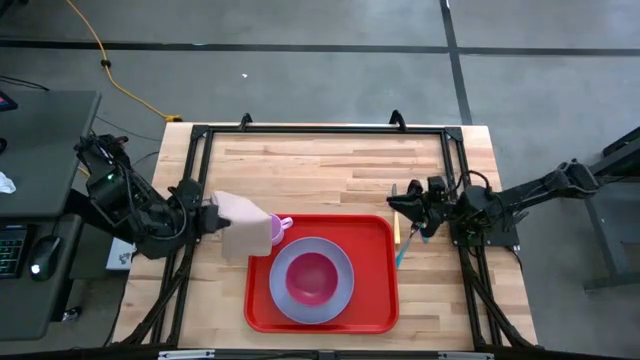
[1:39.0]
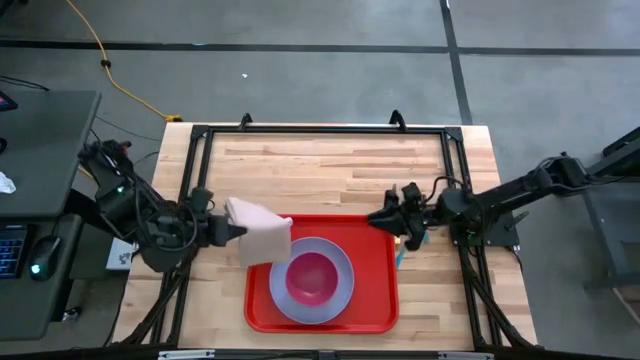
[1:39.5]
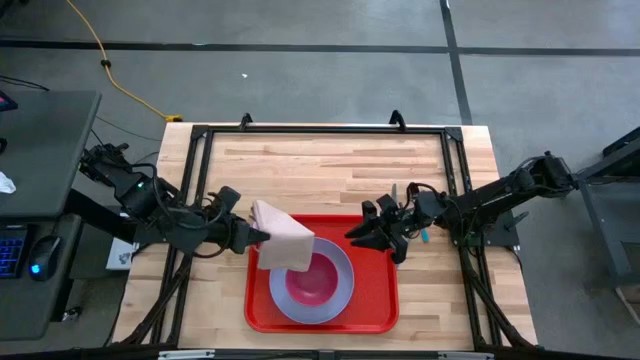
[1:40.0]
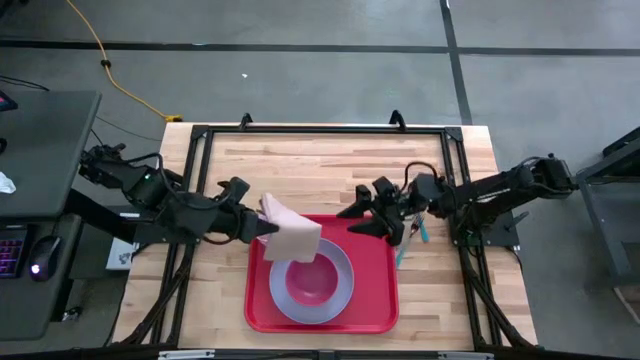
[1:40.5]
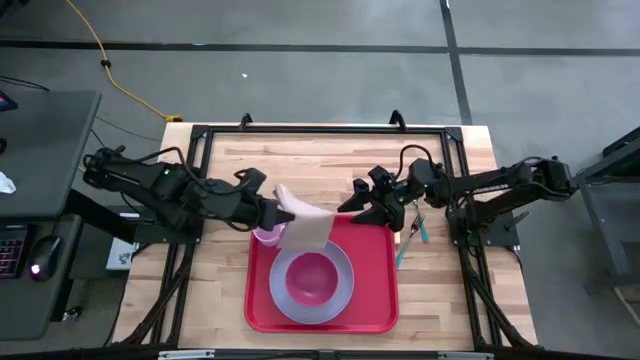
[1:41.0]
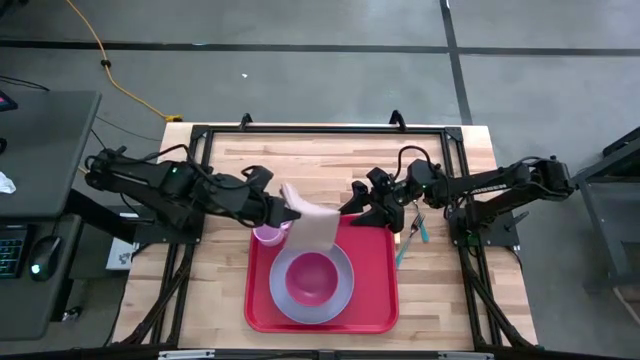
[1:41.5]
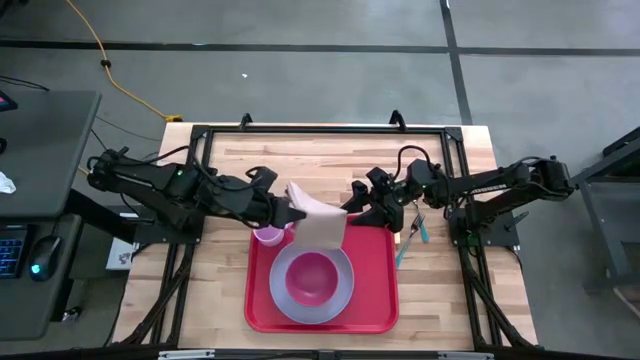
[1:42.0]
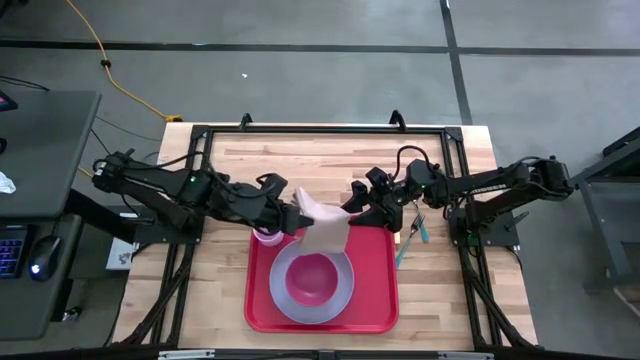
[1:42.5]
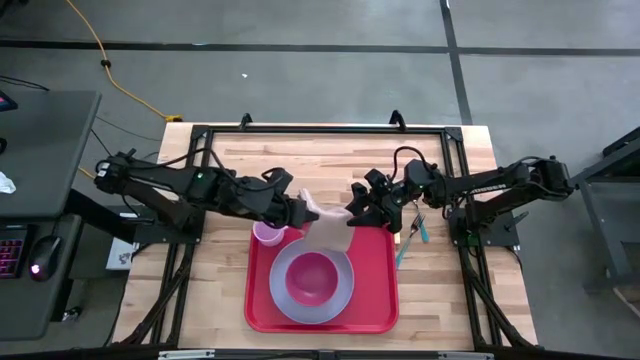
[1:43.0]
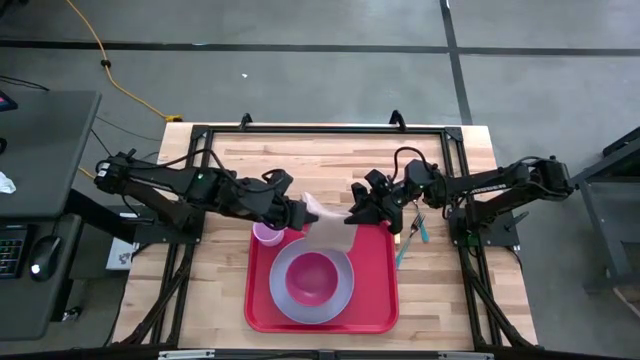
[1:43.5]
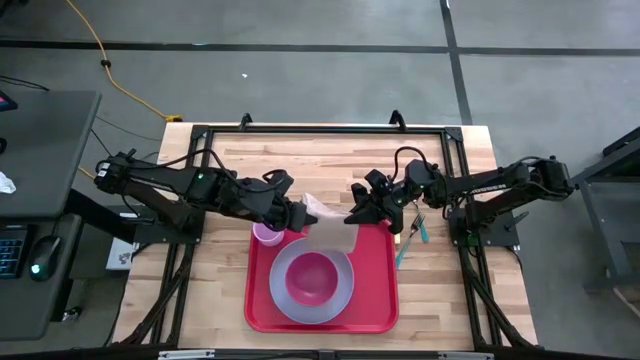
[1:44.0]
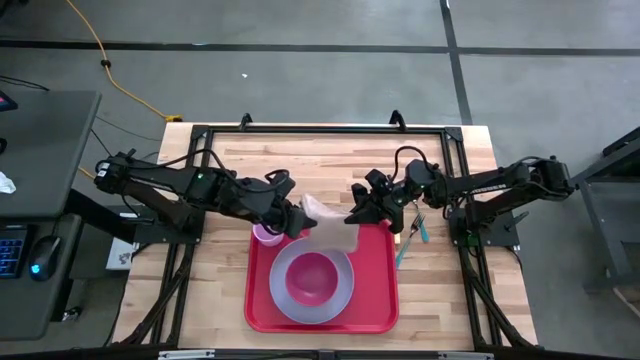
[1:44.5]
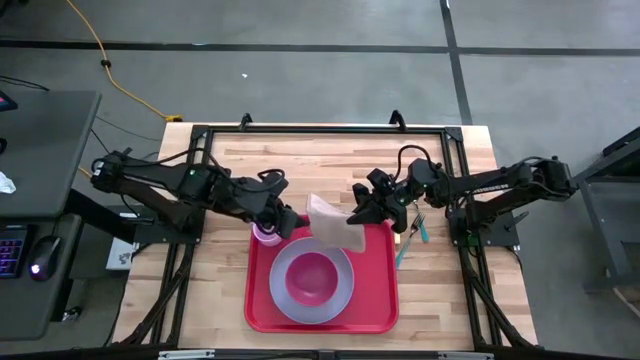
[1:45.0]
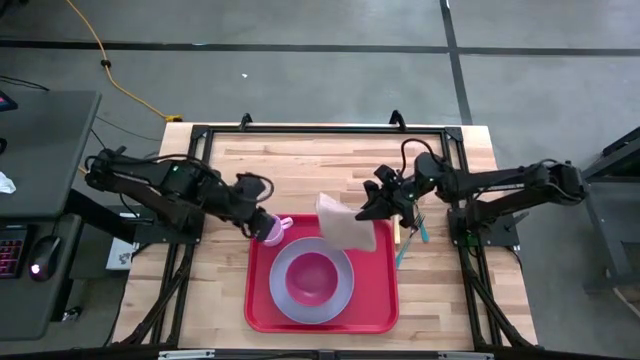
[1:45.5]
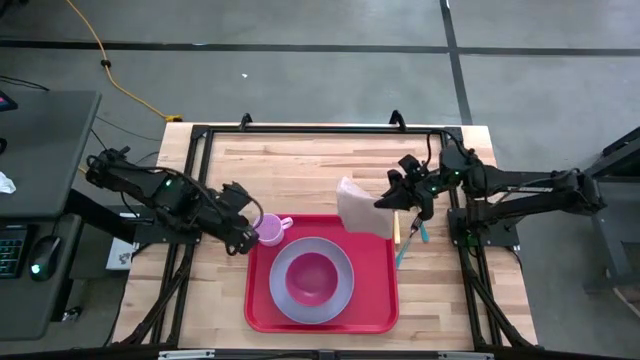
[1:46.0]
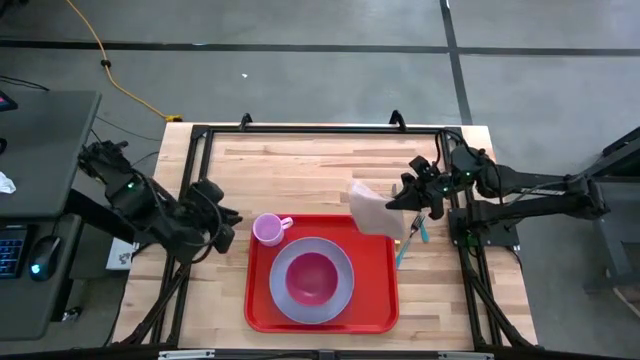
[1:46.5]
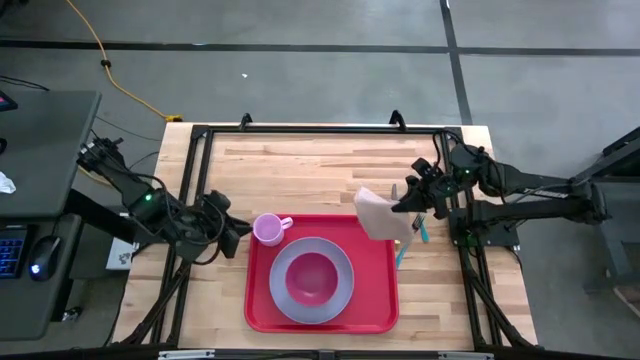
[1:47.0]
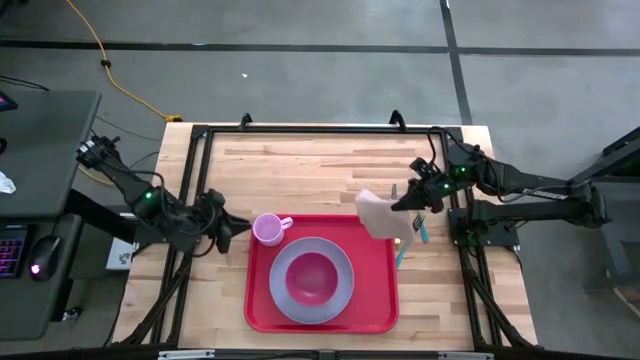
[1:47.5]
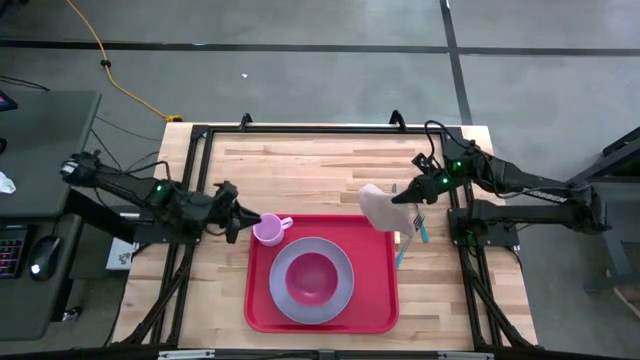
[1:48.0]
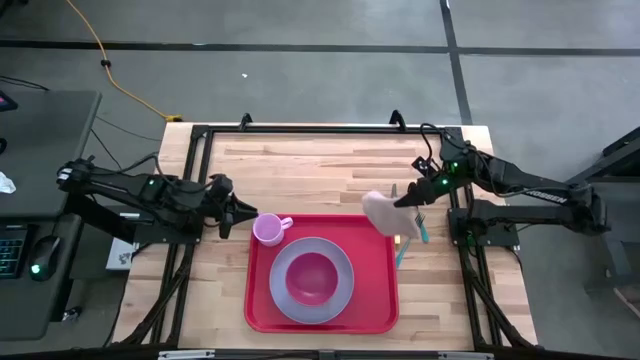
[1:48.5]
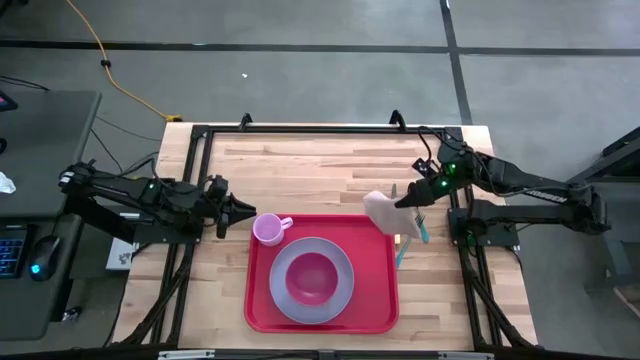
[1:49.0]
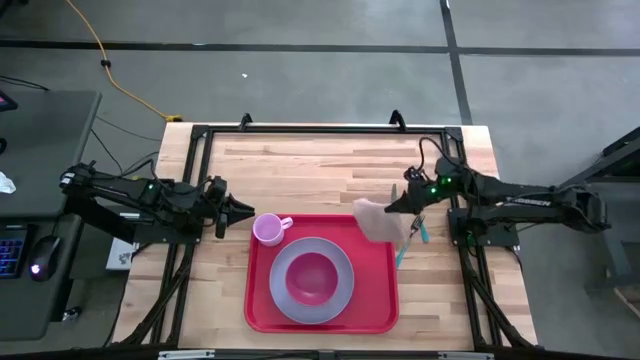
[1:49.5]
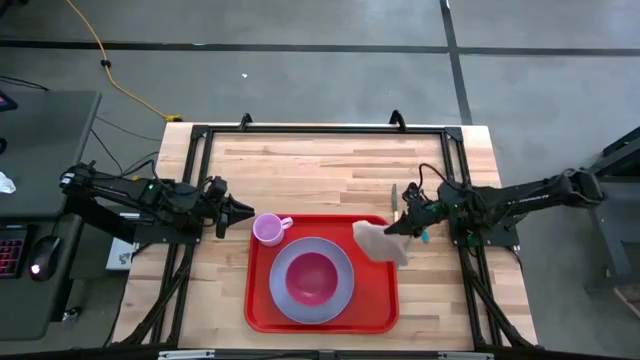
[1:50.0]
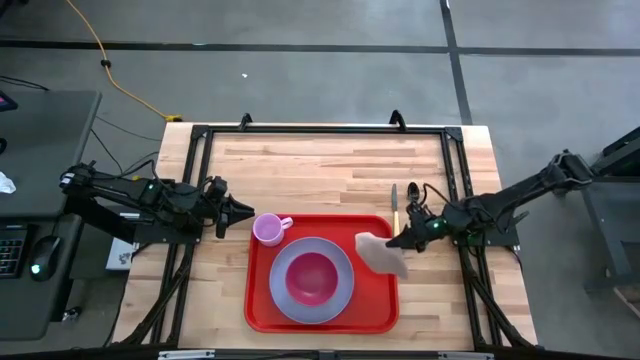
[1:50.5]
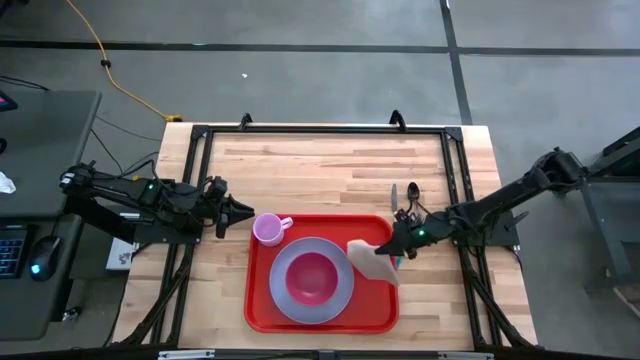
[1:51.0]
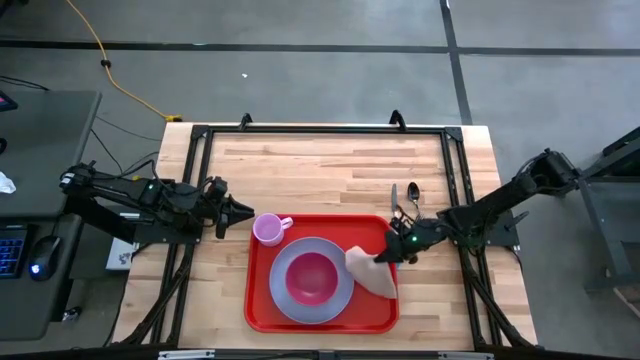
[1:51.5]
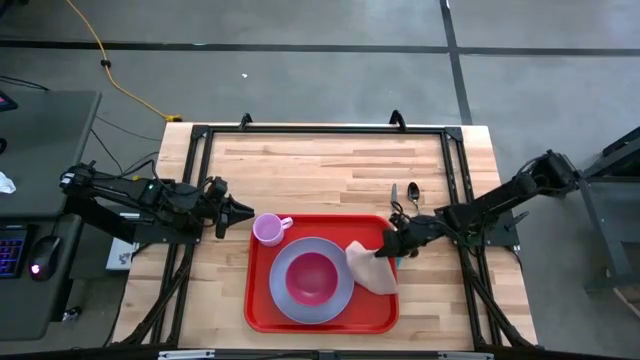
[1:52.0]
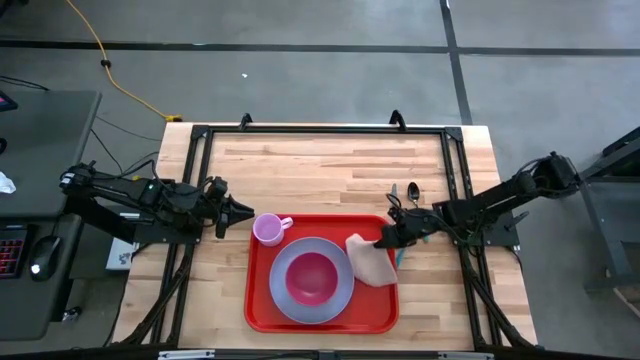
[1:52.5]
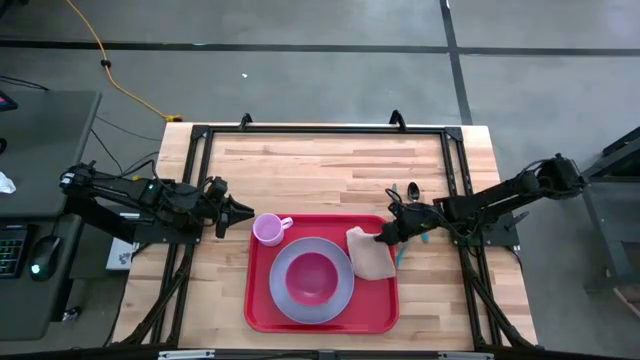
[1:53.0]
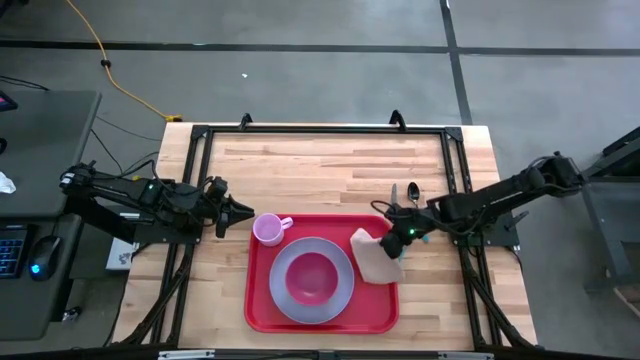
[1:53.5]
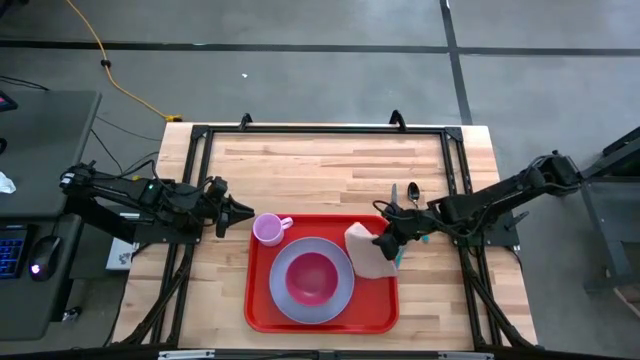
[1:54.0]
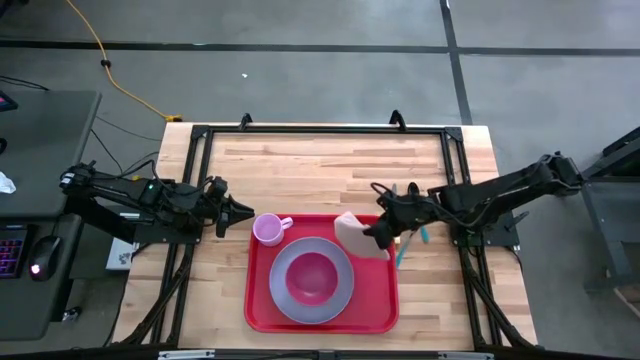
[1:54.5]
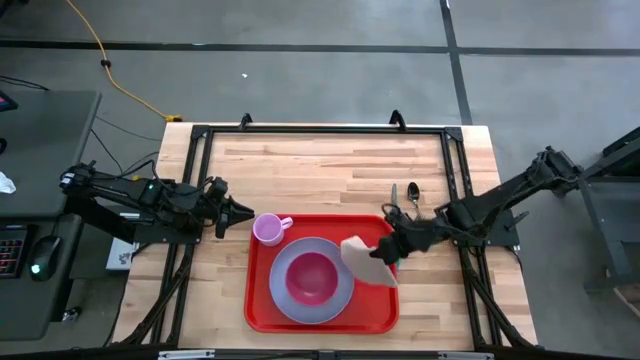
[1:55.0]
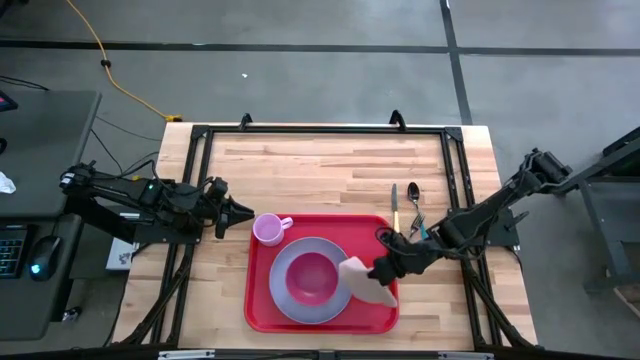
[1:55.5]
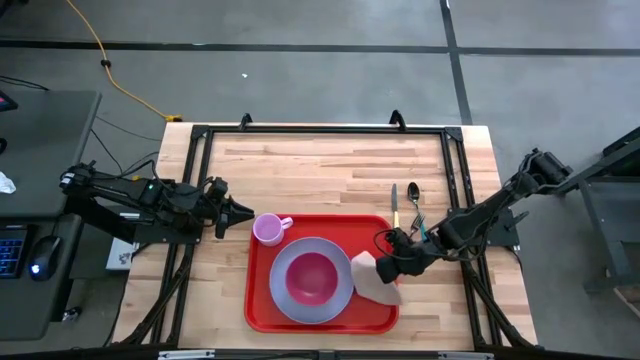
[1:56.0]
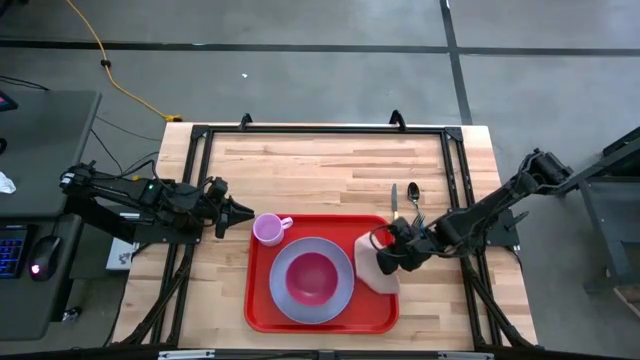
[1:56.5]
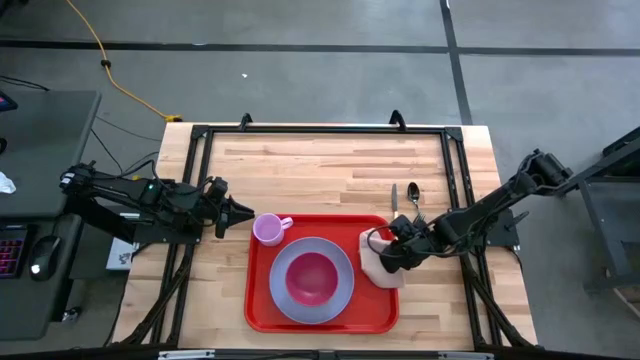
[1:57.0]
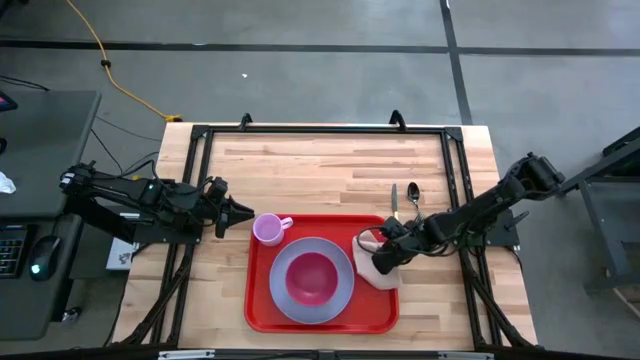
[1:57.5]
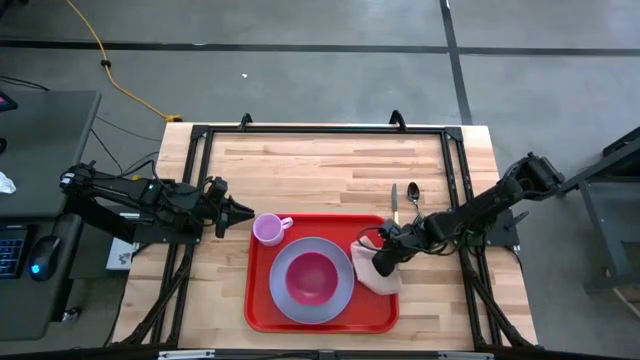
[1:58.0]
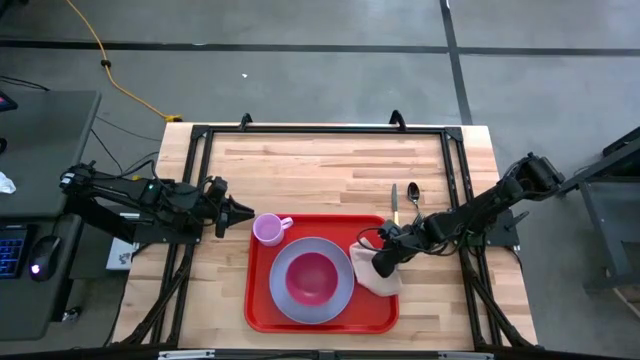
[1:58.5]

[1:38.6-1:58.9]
Task: Set up tray
Put the brown table napkin on the red serving tray to the right of the purple plate
